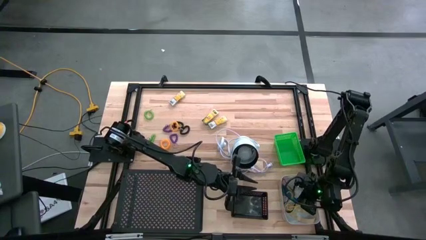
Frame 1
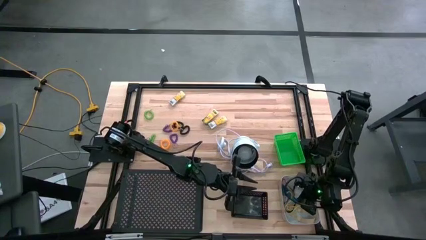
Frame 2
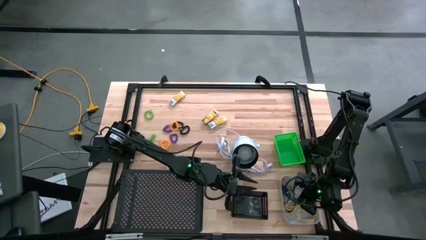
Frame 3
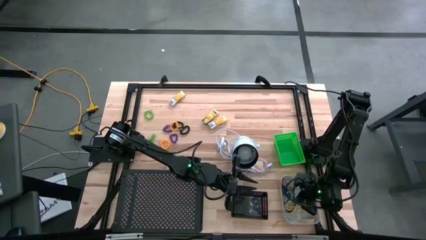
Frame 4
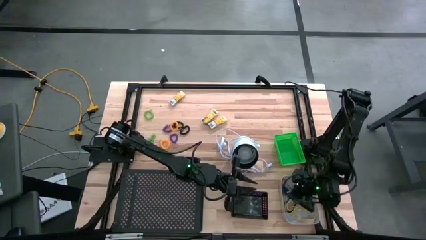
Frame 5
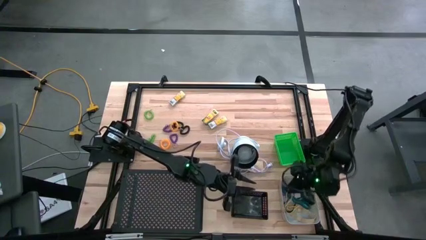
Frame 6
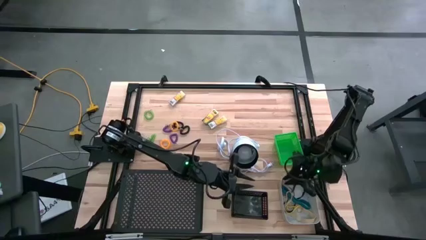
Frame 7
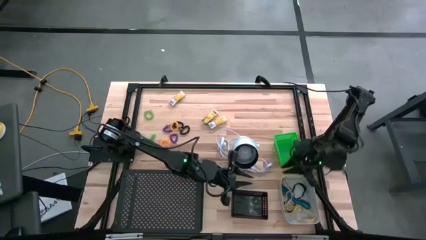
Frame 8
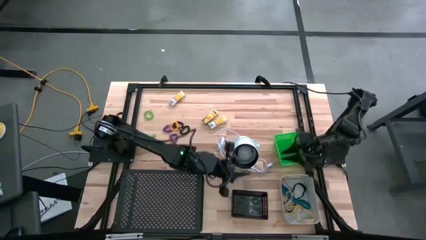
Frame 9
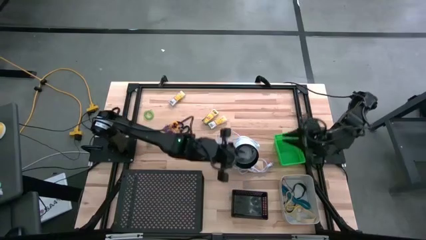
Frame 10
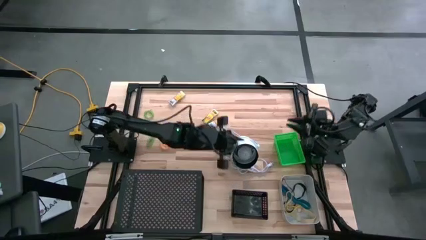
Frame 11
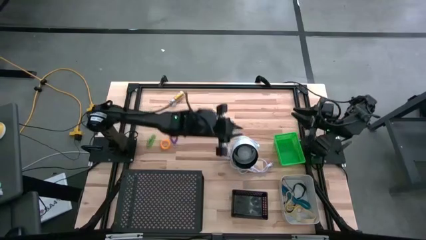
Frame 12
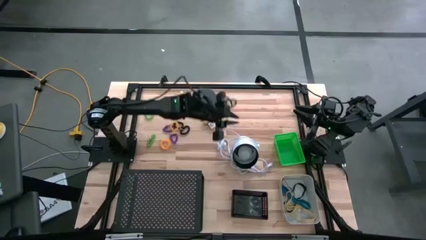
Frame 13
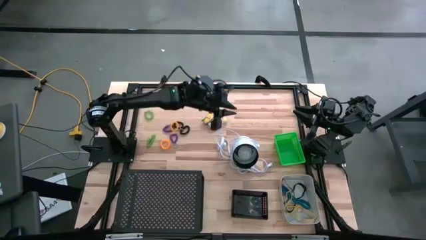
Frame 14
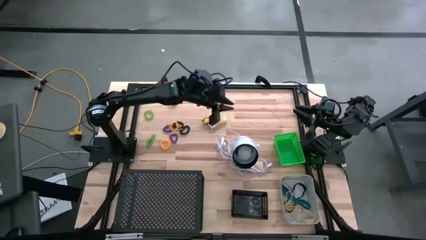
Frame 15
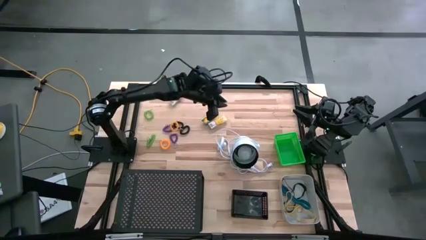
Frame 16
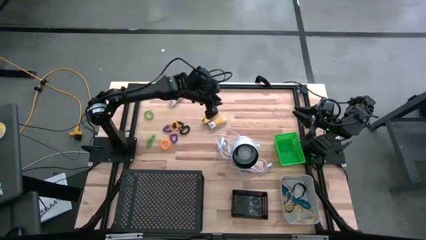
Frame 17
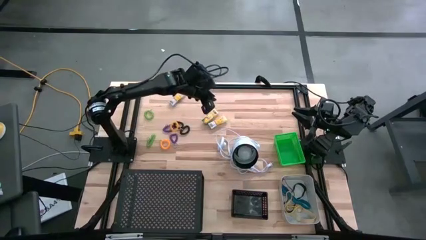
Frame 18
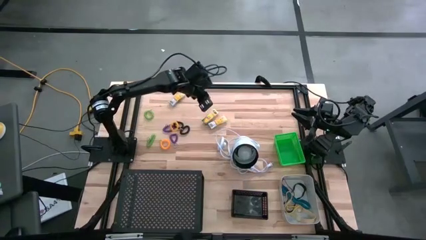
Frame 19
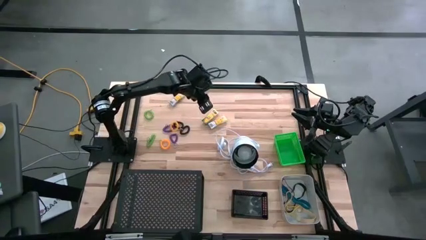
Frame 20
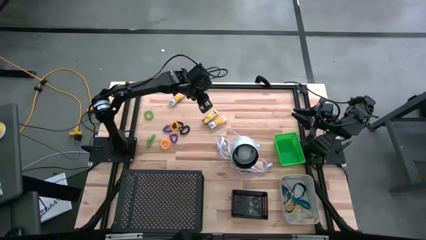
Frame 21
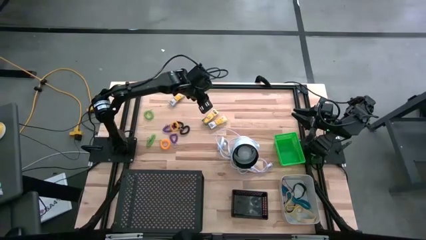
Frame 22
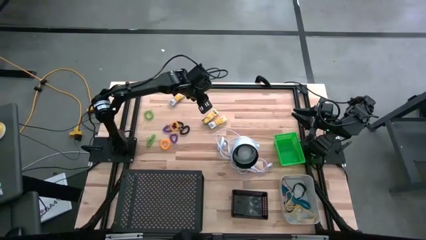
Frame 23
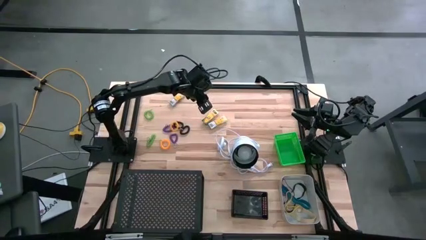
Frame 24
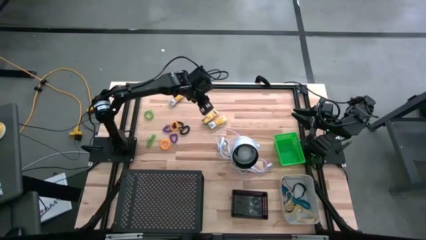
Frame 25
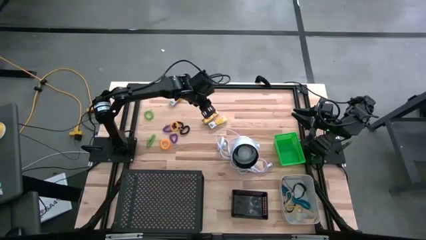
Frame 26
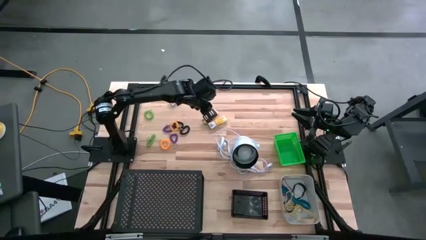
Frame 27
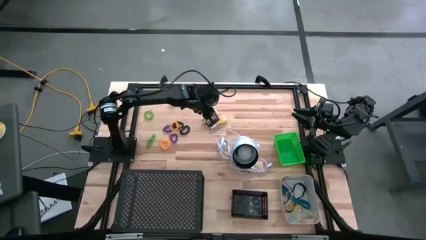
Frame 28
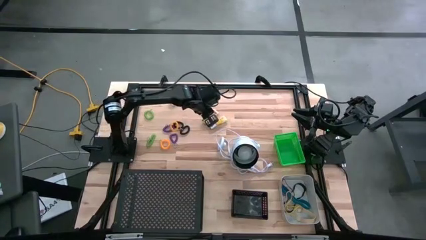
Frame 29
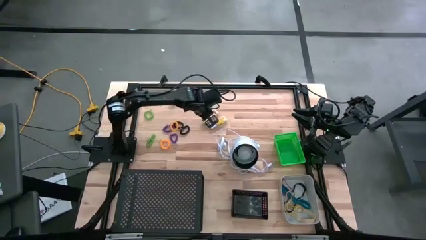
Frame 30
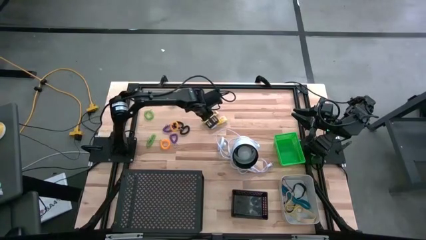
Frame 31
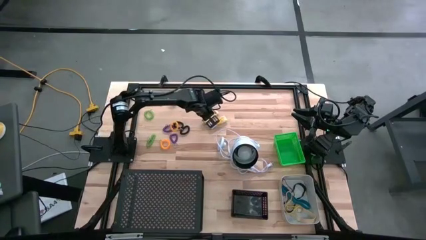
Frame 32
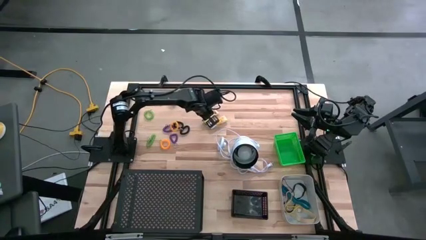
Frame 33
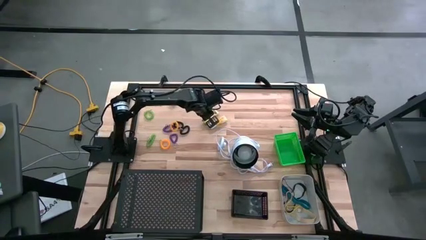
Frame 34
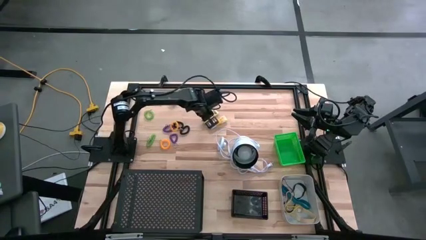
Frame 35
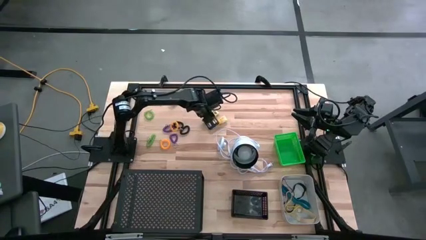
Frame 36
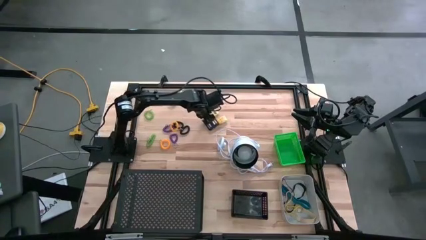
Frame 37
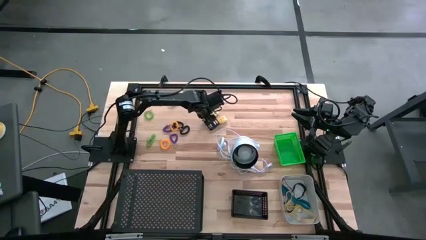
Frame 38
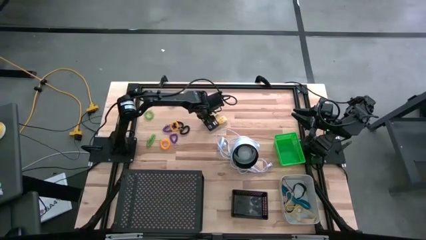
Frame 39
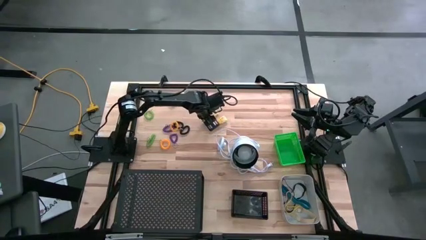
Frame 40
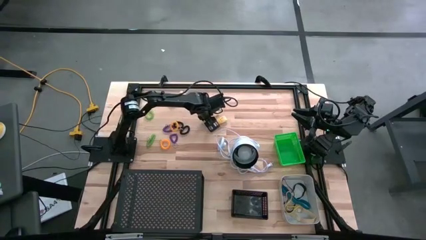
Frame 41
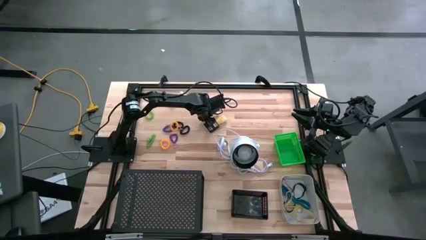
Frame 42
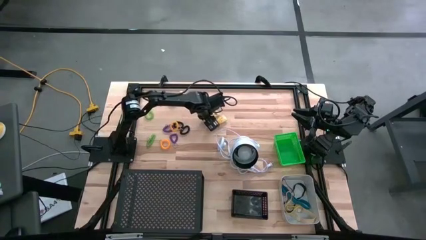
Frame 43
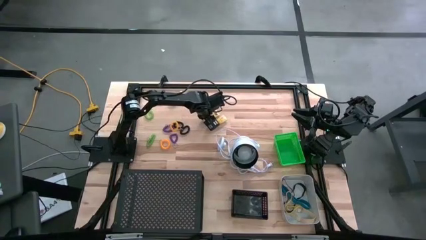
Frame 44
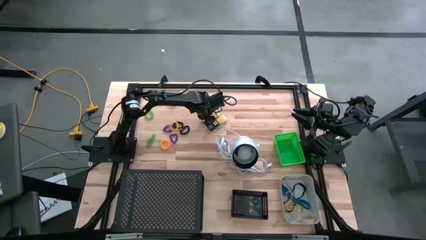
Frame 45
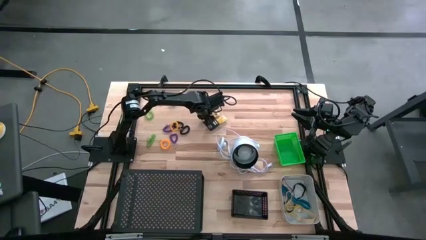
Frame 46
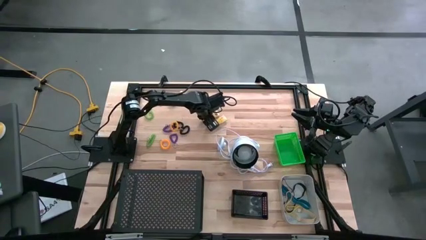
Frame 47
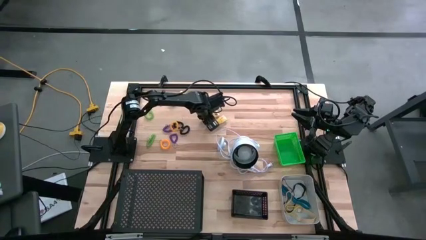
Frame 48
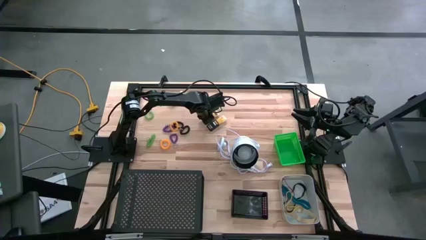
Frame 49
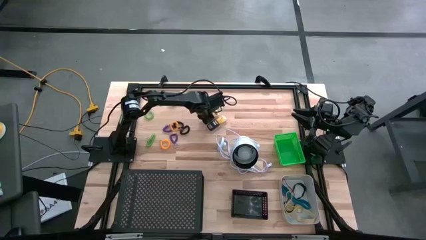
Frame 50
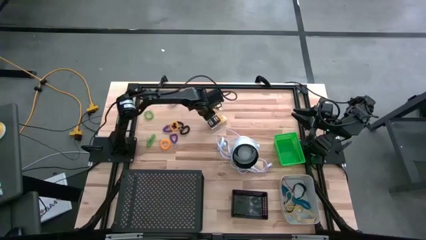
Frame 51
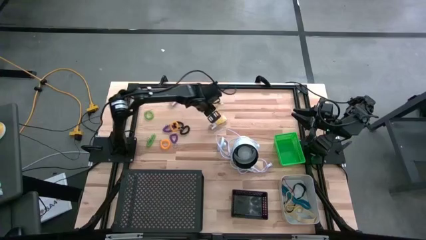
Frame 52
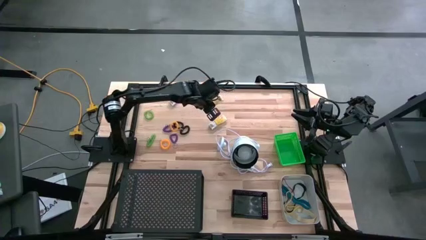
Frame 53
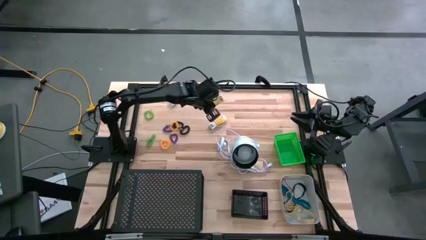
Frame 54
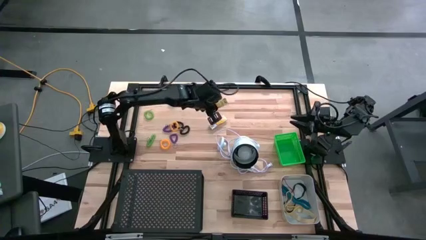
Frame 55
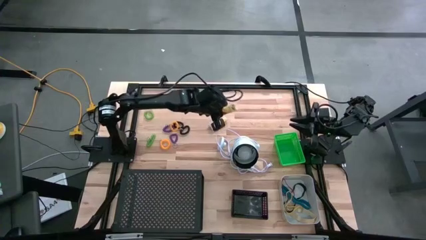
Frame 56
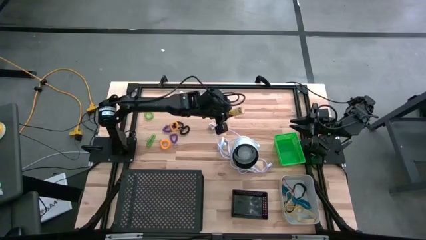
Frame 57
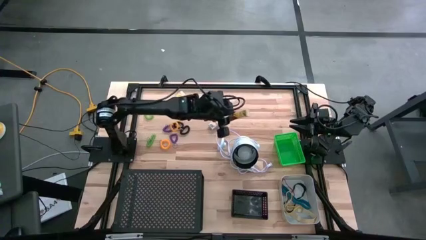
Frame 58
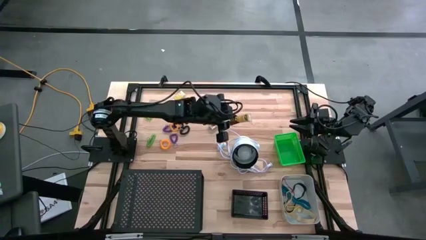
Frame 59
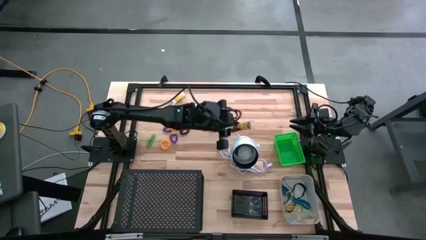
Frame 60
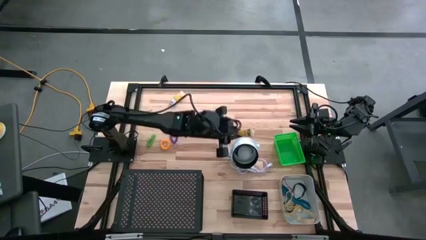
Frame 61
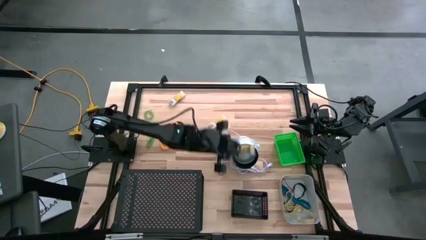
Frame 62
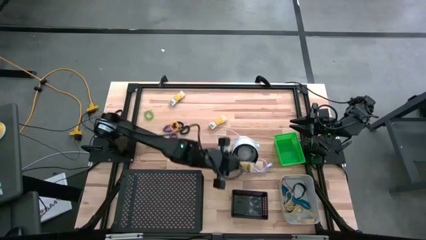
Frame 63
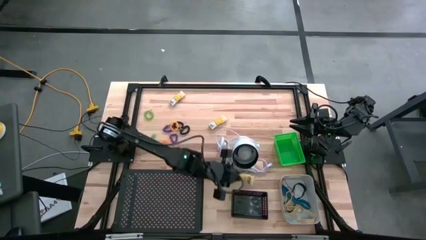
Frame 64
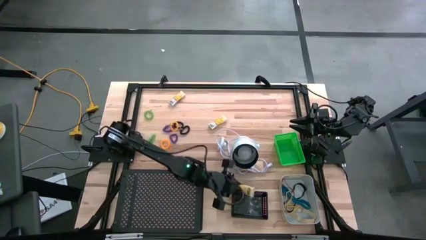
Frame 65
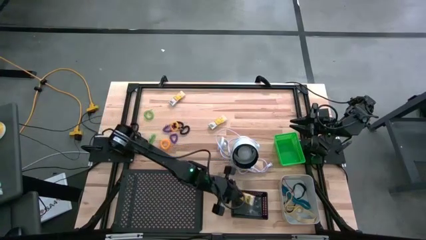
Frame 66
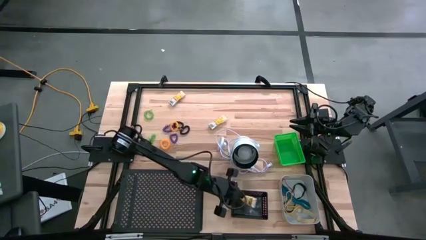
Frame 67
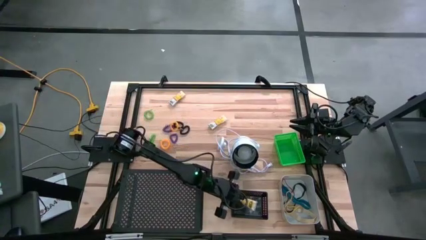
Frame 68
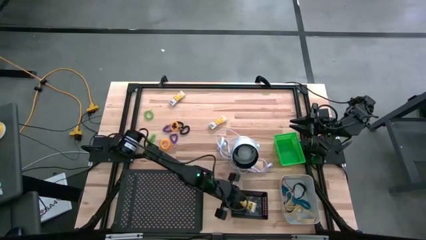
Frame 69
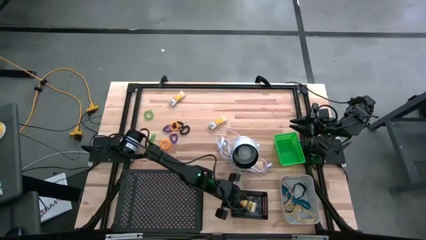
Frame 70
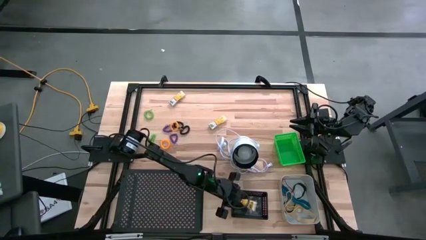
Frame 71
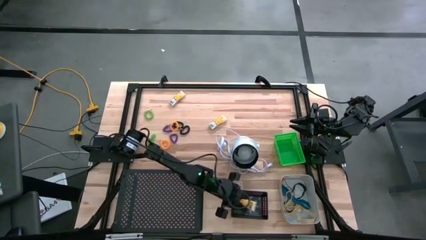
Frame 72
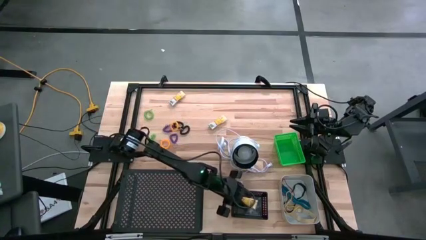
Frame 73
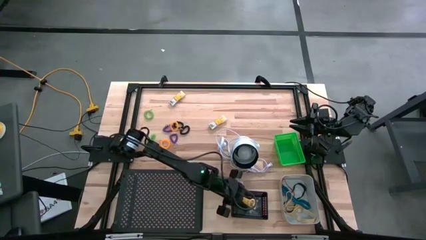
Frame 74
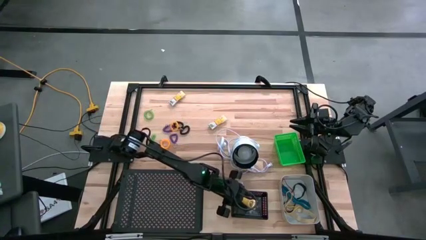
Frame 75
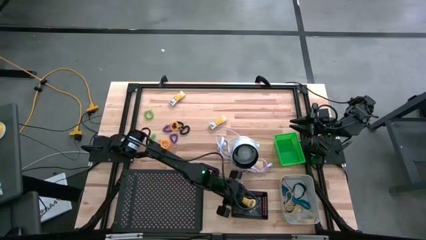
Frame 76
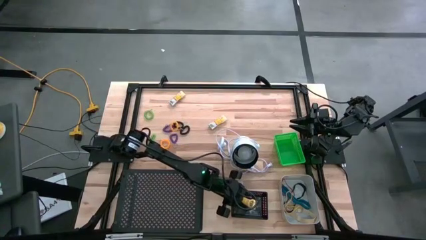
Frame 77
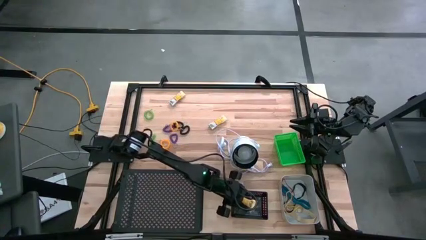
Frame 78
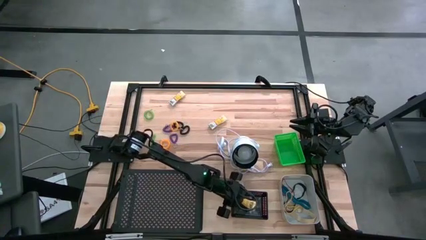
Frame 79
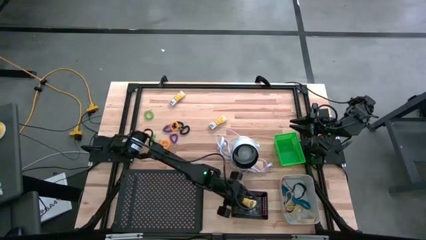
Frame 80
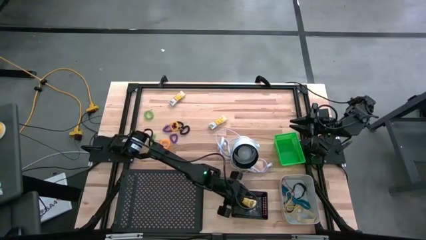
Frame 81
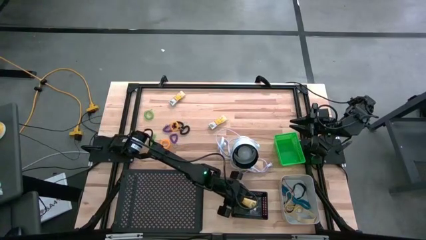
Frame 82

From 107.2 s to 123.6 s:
Task: Pick & Place Office Desk Supplies
Put the middle yellow crayon box into the black bin
